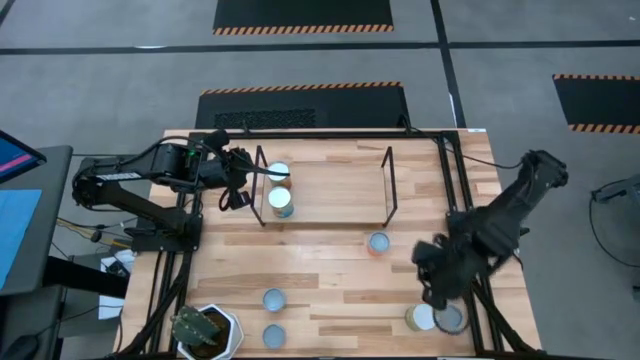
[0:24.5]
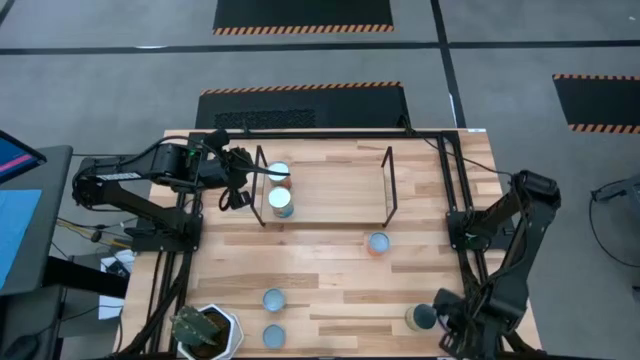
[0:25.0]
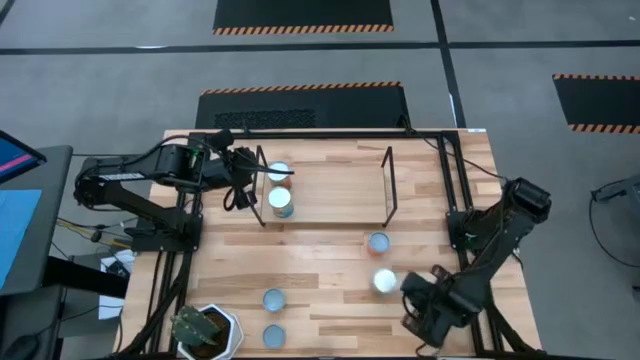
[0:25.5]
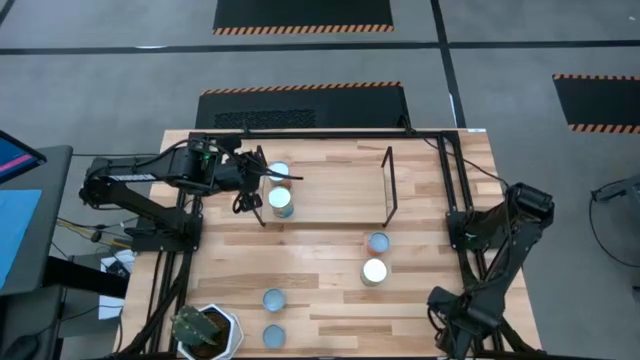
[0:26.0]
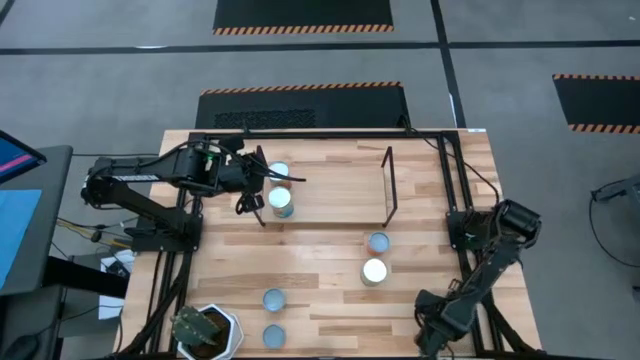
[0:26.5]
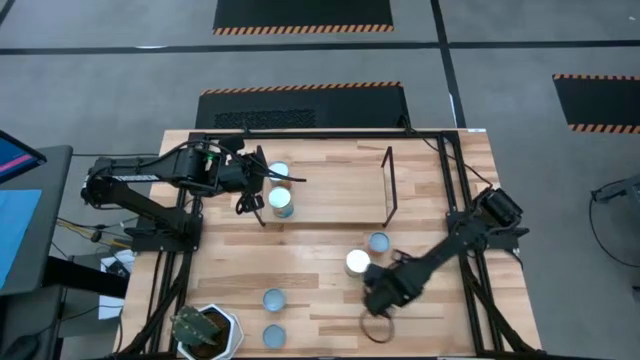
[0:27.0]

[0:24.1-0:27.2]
Task: Pick and place cans onto a shelf
Move the canned peaches and blue and red tuna can to the top

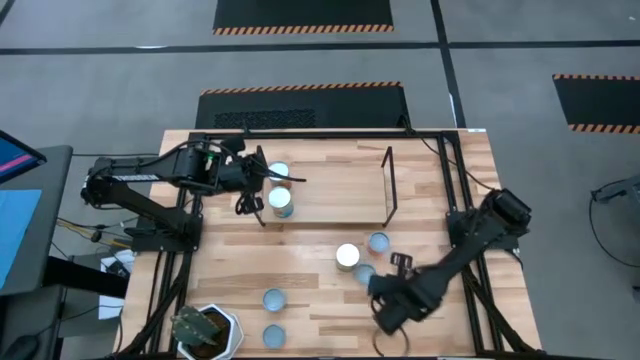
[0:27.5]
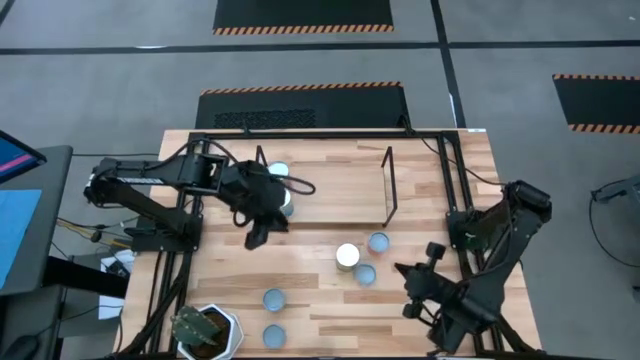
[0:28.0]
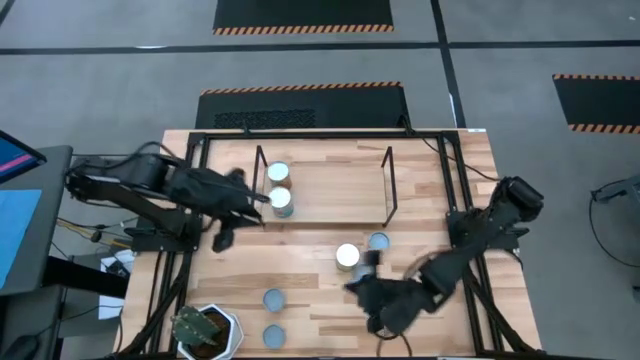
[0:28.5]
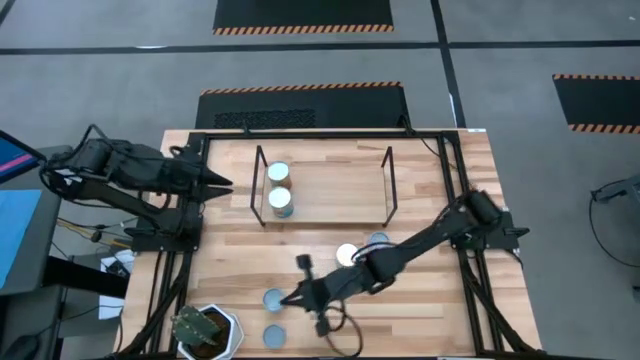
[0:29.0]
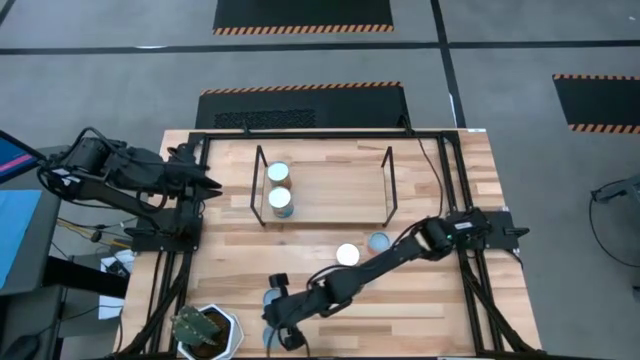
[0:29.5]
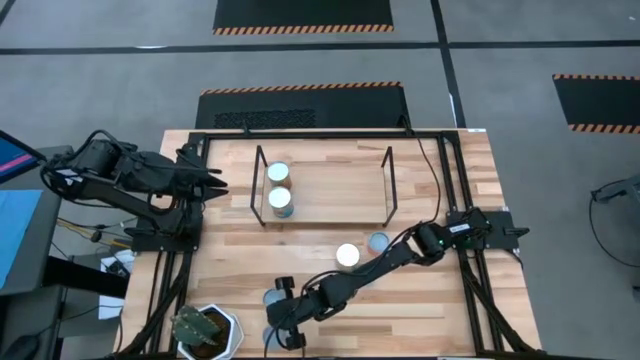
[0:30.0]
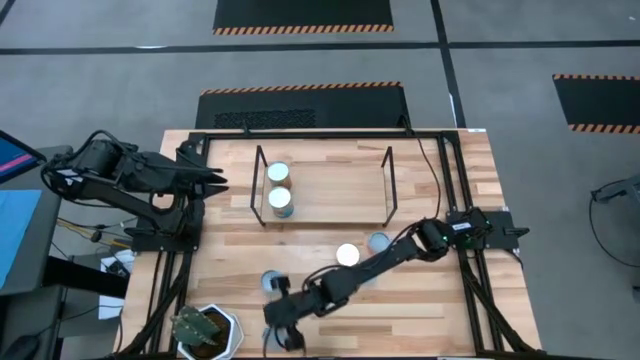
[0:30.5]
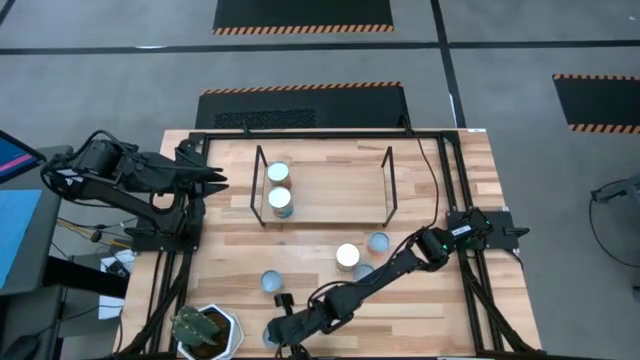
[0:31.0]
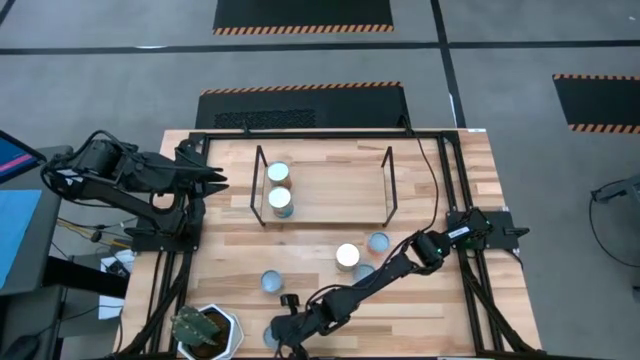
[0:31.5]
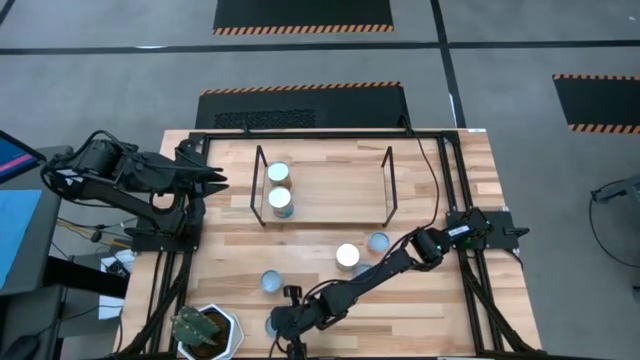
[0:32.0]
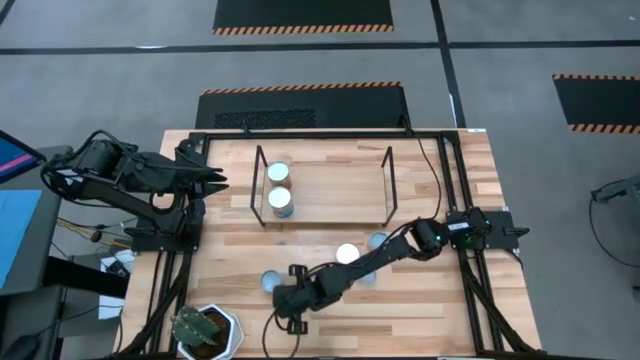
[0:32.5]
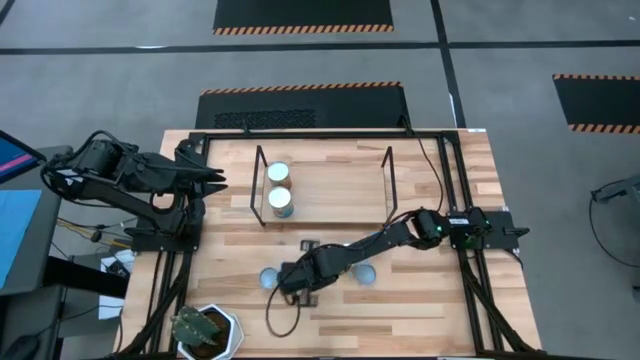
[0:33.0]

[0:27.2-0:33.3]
Move the canned pears, canned pineapple rings, and canned salmon to the center of the table

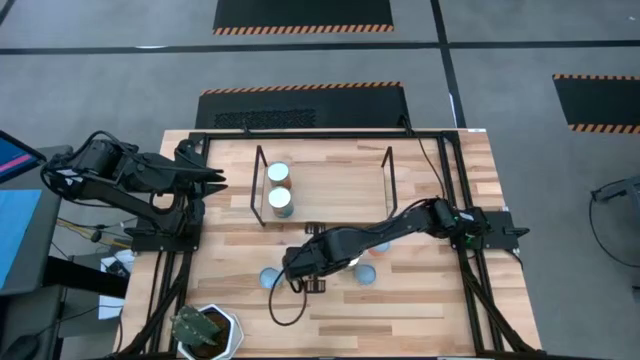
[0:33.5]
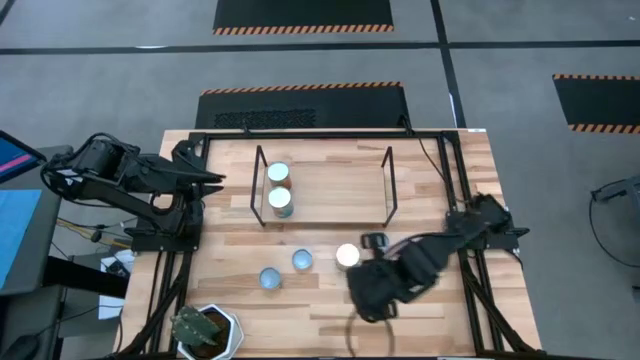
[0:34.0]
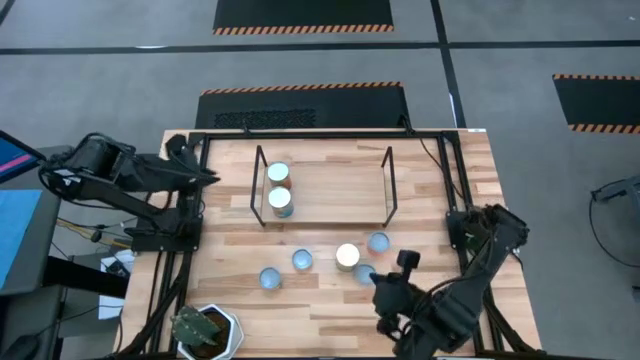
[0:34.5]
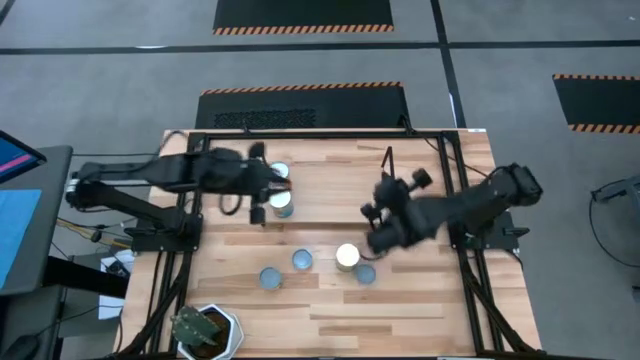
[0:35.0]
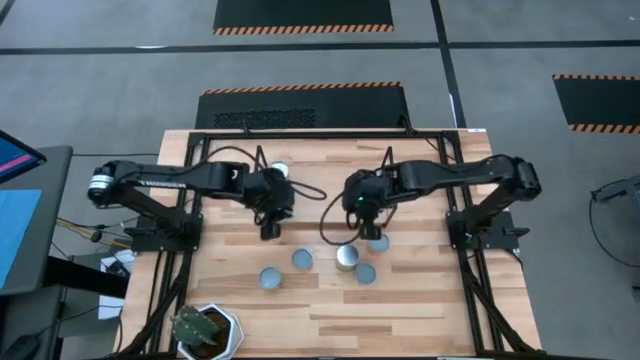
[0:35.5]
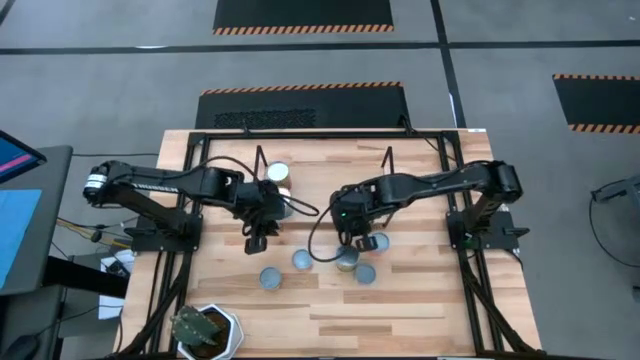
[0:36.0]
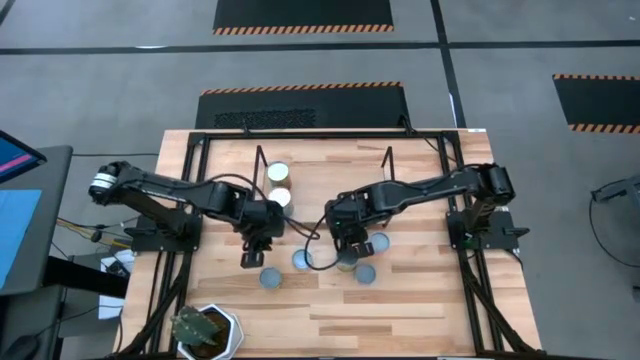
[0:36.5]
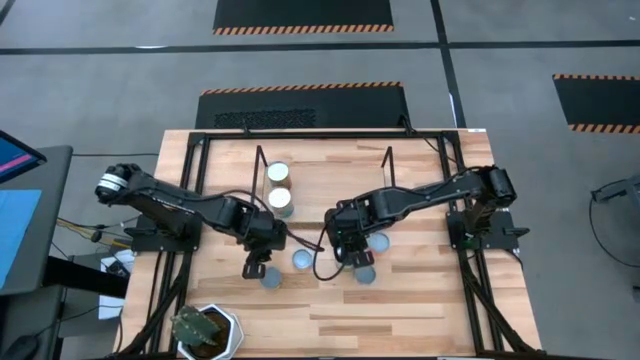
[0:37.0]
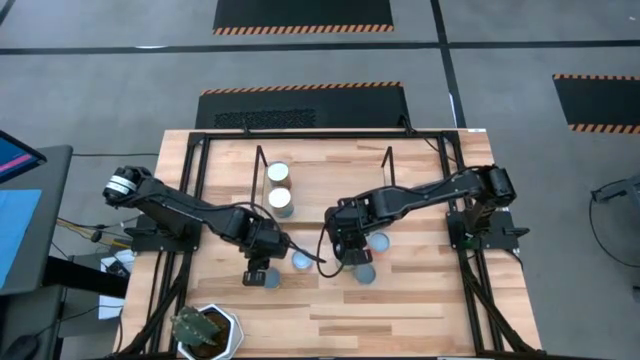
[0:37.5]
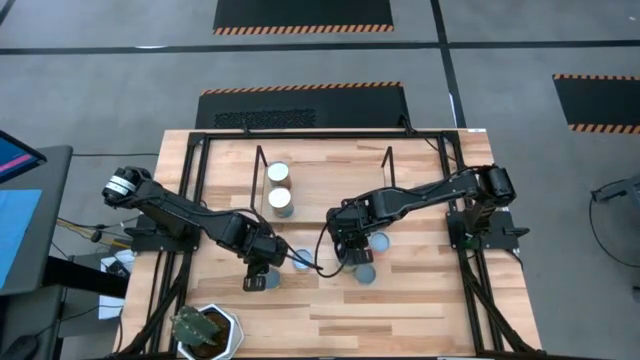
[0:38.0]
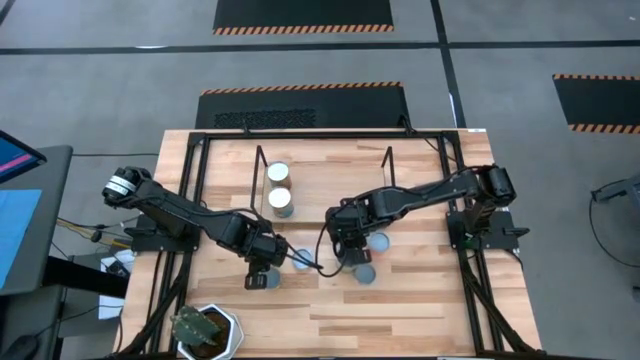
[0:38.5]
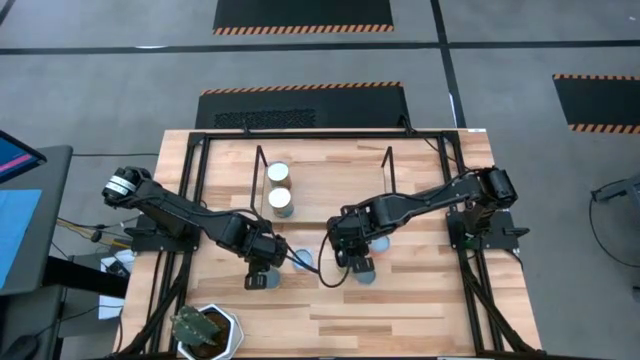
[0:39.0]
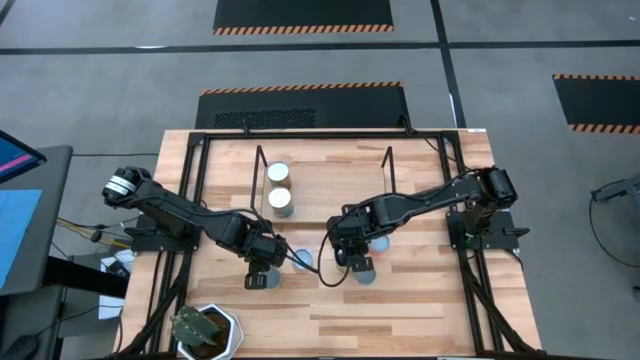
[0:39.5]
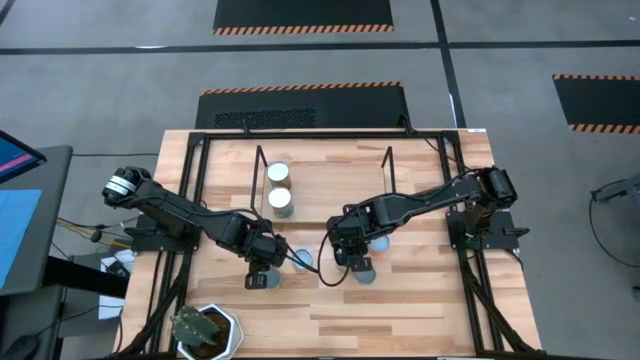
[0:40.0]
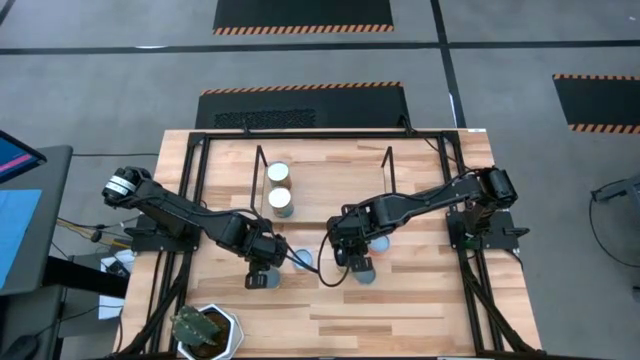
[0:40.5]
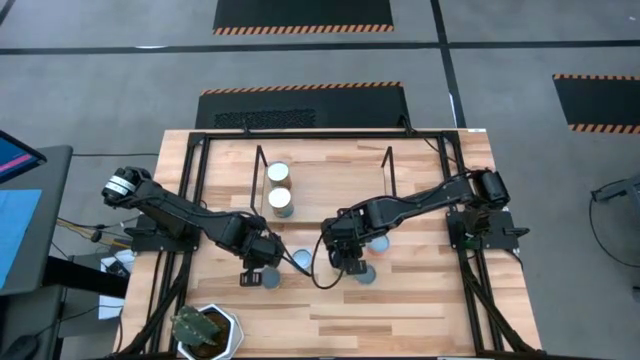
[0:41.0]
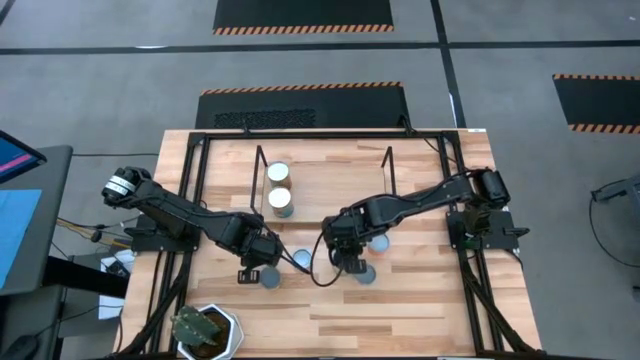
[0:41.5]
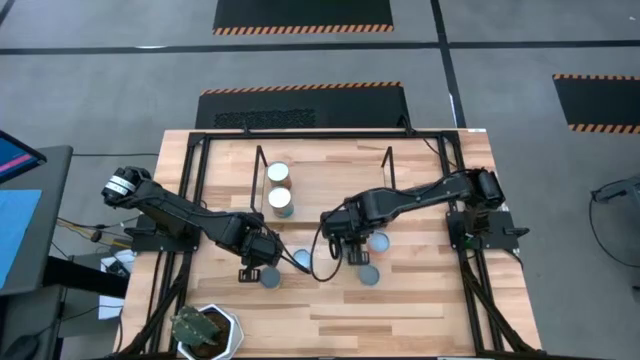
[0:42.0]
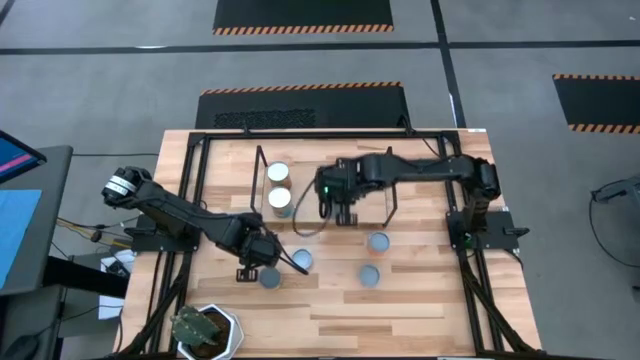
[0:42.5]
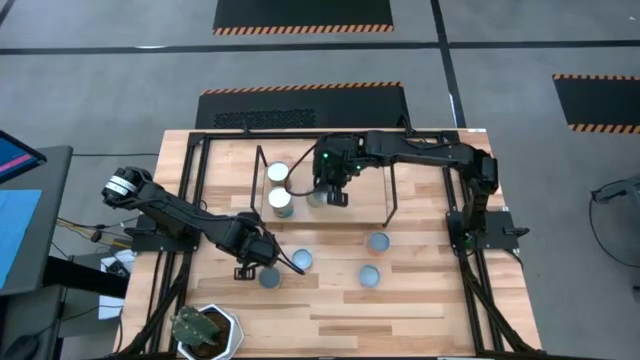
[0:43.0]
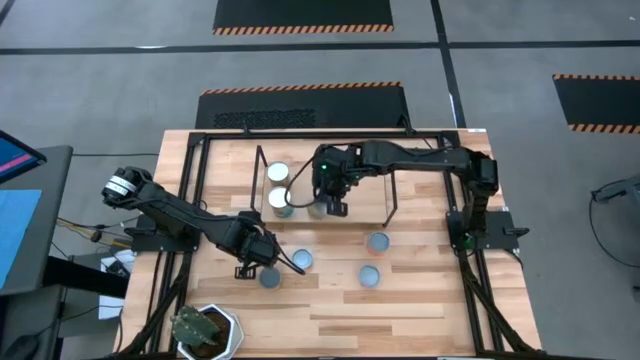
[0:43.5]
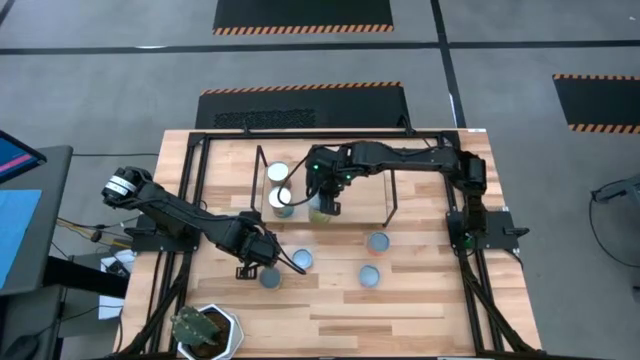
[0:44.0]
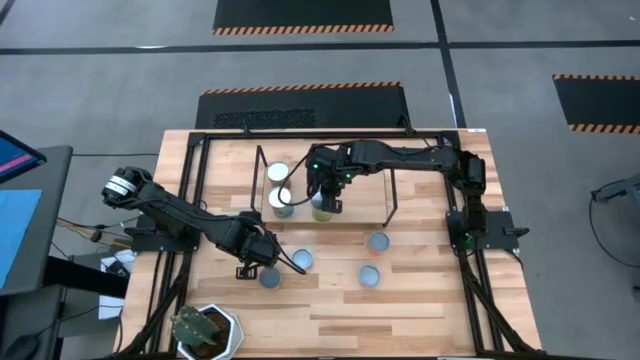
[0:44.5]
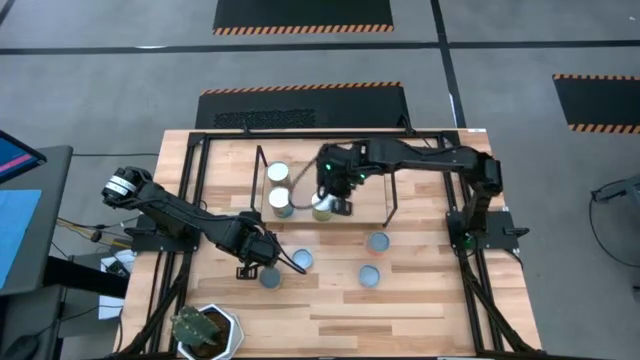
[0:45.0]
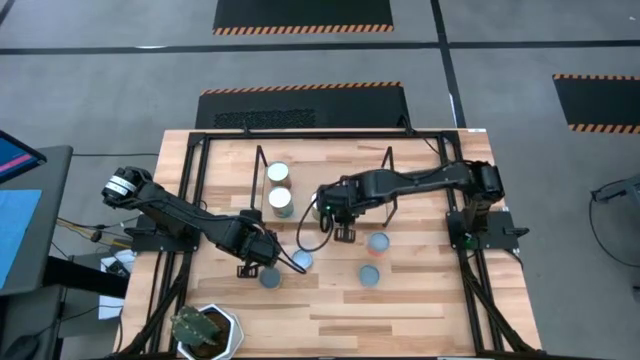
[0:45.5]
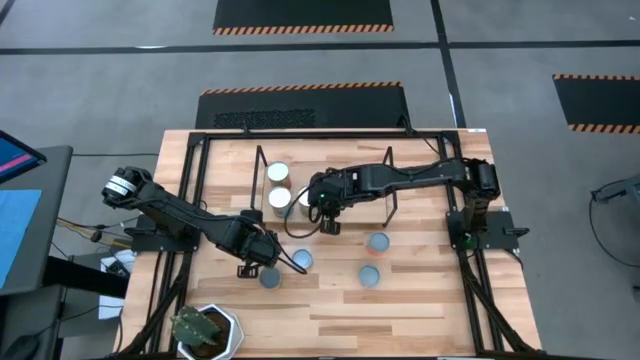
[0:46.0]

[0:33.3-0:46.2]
Put the top canned peaches on the shelf
